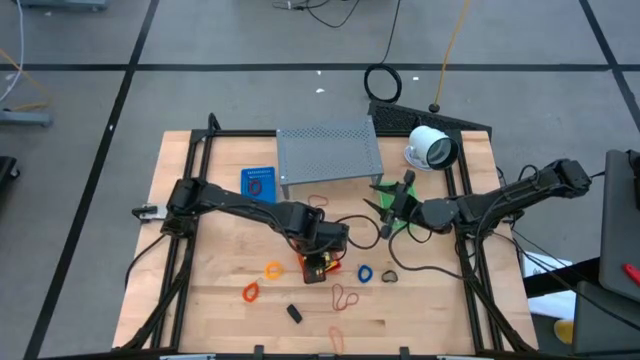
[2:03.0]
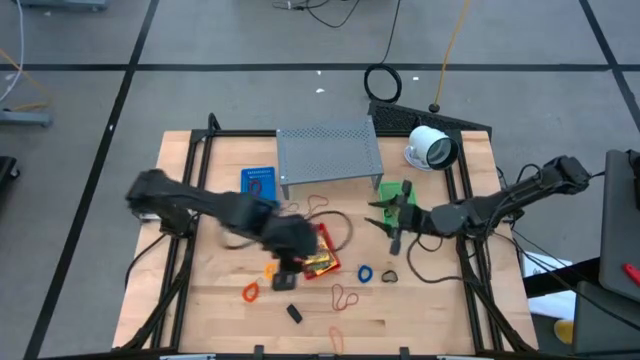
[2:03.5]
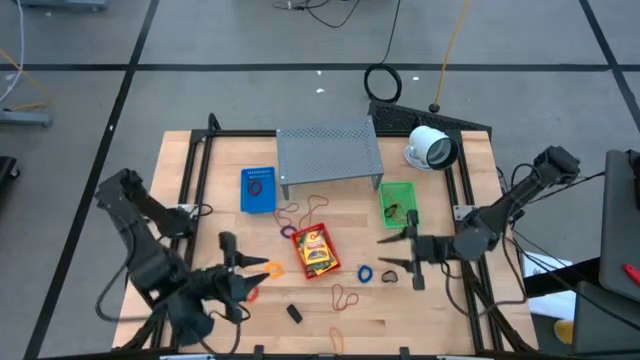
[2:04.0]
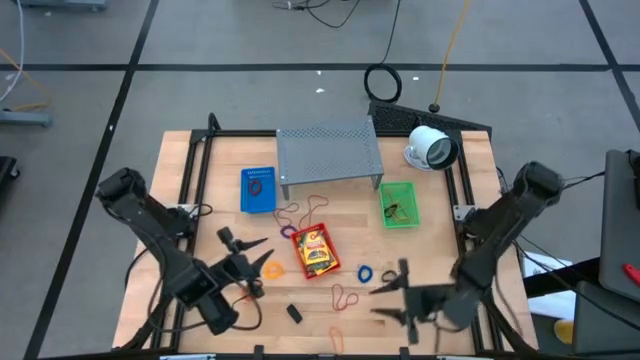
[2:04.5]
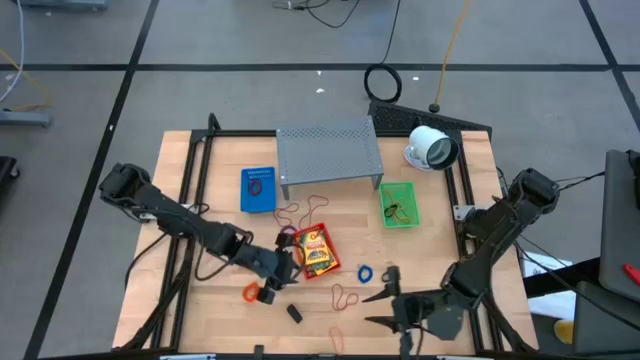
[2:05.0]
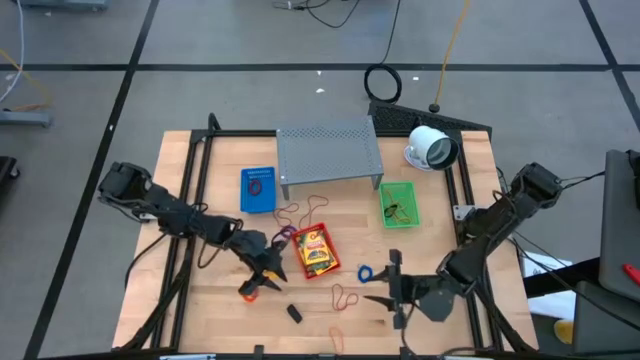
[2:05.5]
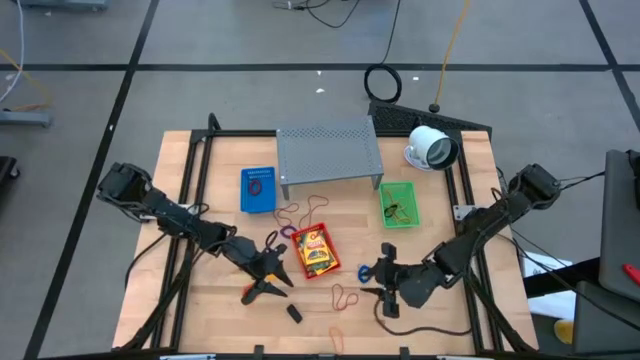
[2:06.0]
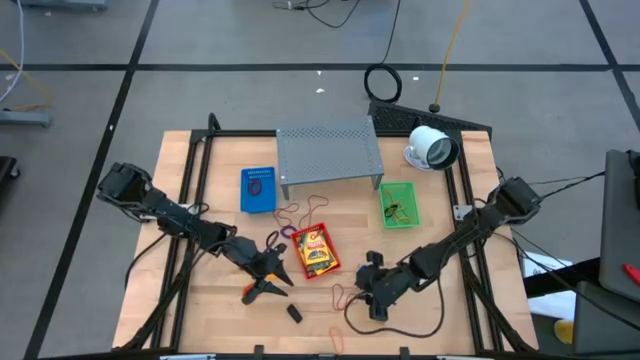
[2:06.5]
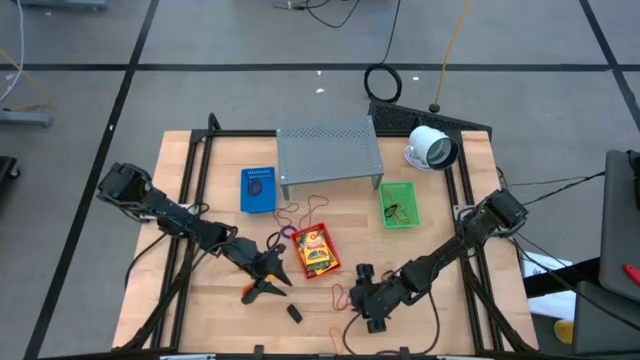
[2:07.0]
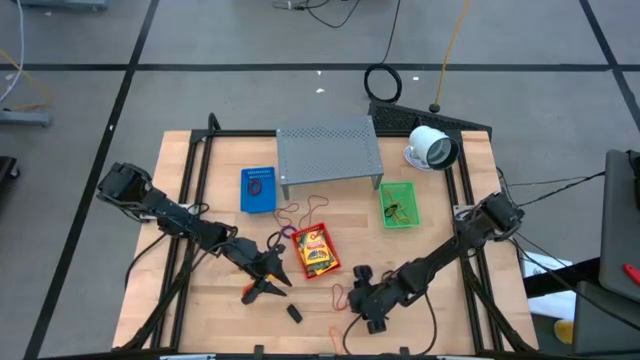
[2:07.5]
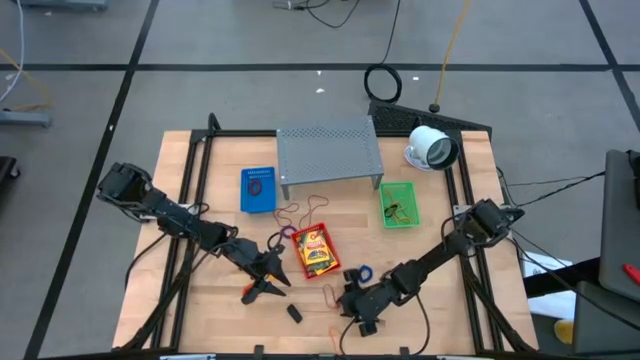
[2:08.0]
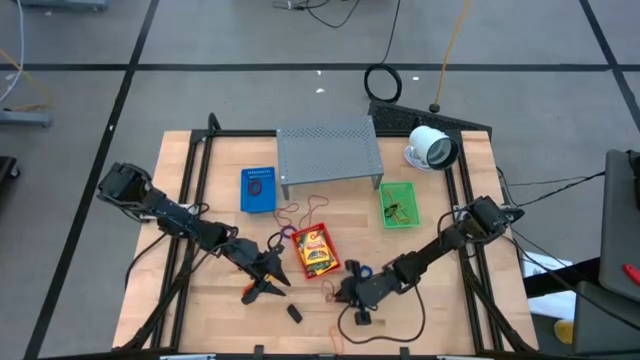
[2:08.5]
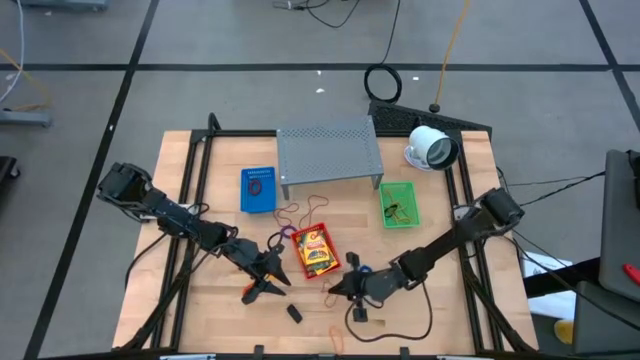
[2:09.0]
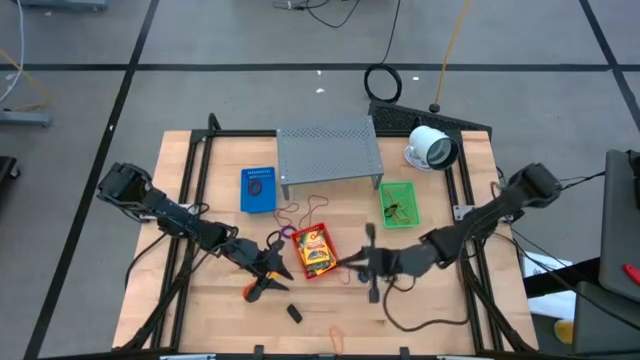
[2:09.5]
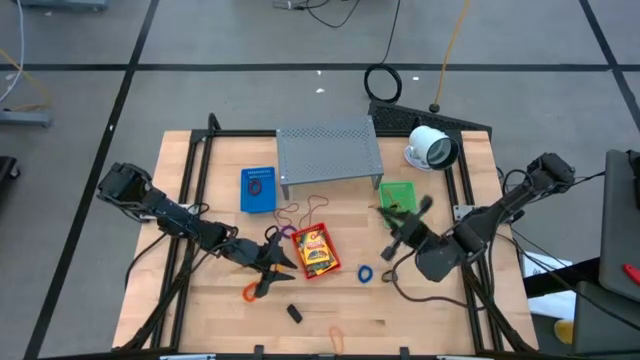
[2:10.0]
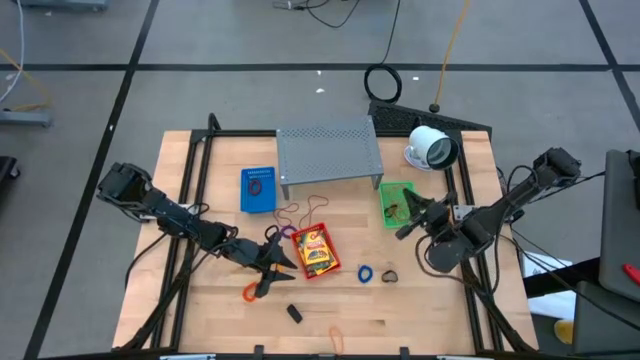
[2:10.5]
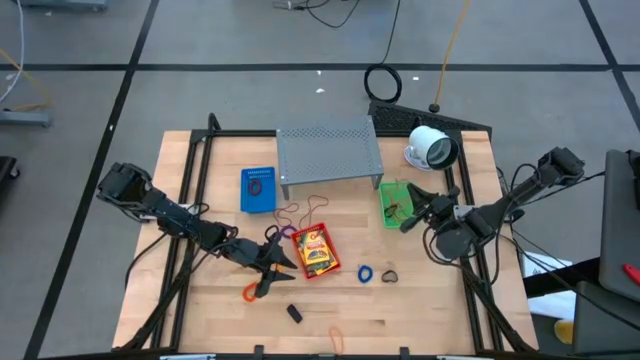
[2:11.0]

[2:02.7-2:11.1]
Task: Pick & Place Office Desk Supplies
Put the bottom red rubber band into the green bin

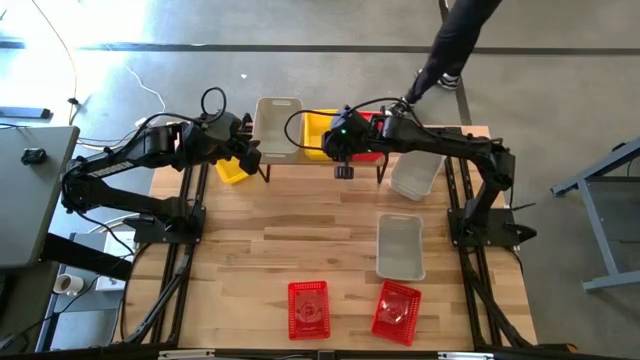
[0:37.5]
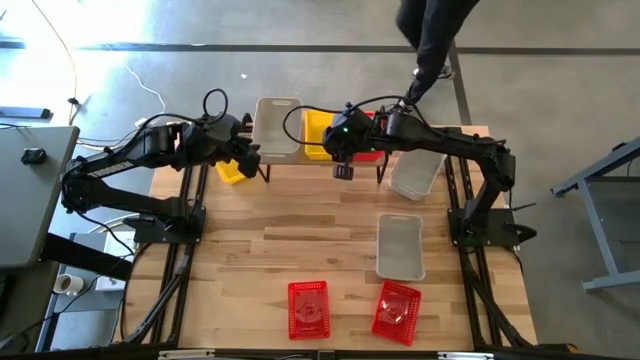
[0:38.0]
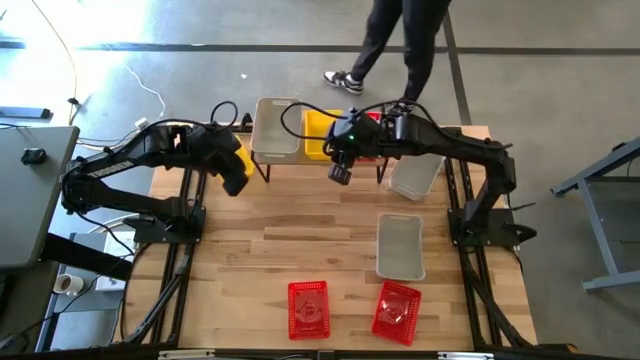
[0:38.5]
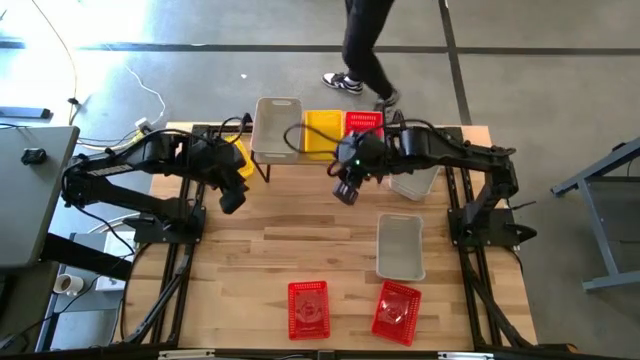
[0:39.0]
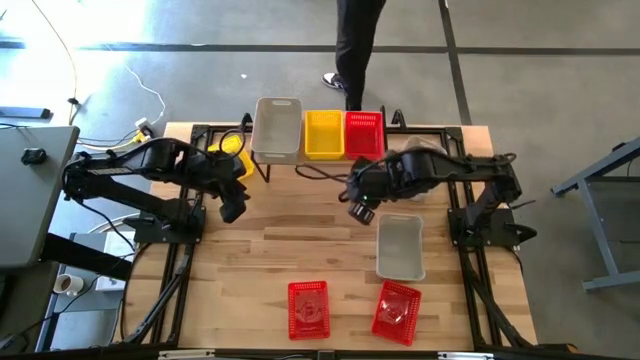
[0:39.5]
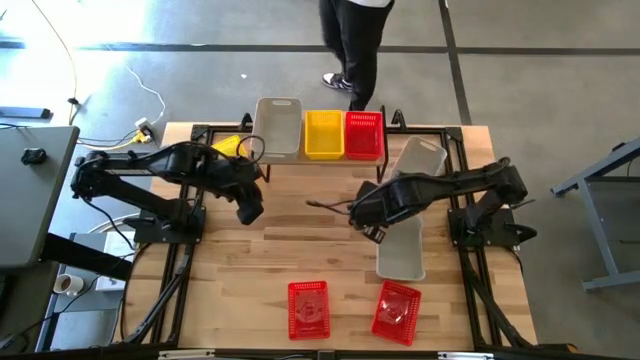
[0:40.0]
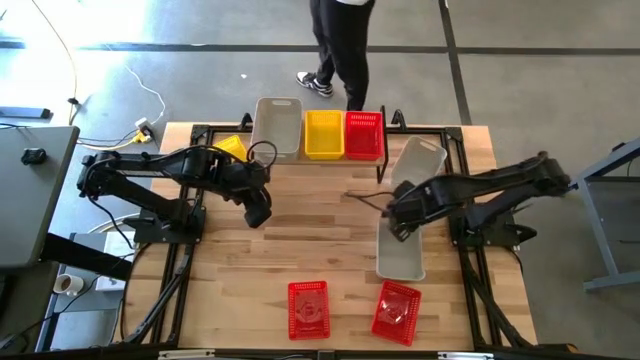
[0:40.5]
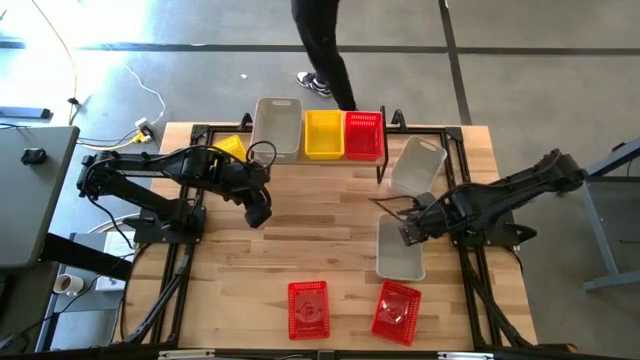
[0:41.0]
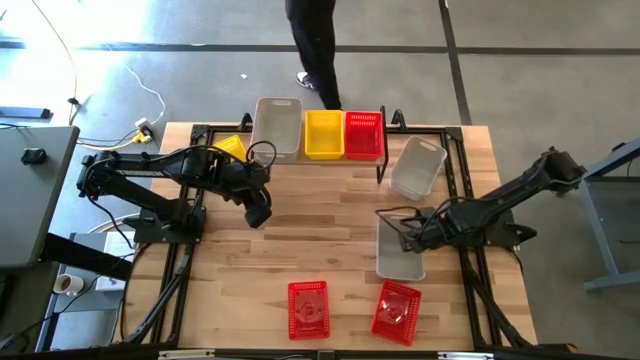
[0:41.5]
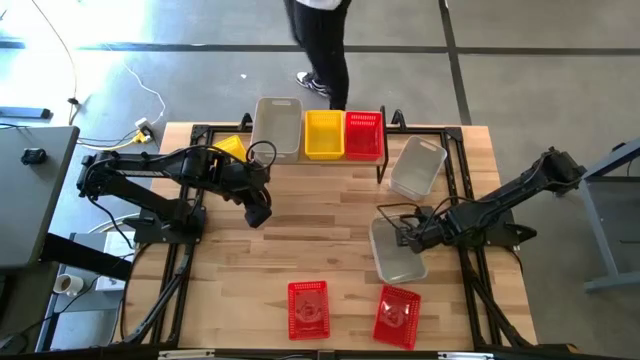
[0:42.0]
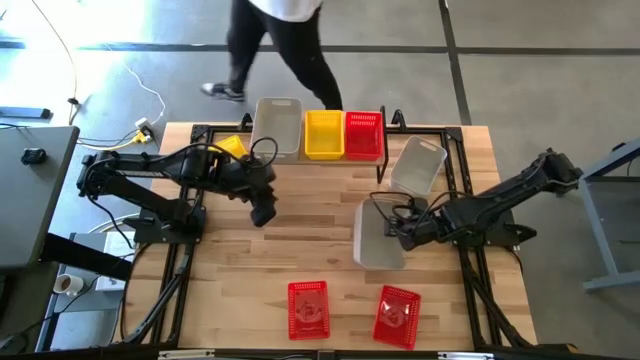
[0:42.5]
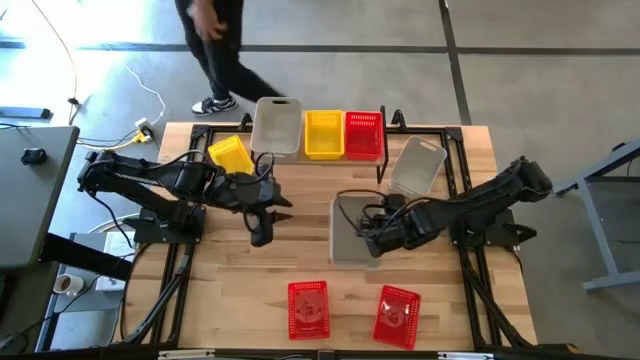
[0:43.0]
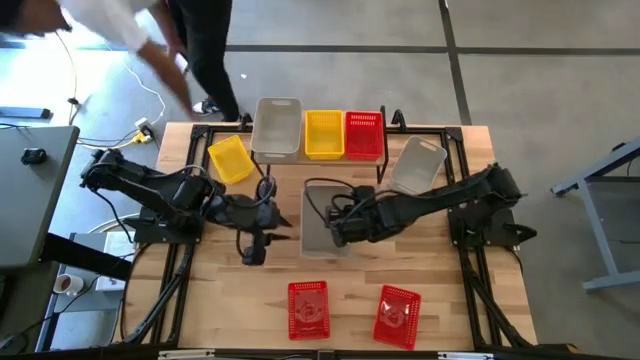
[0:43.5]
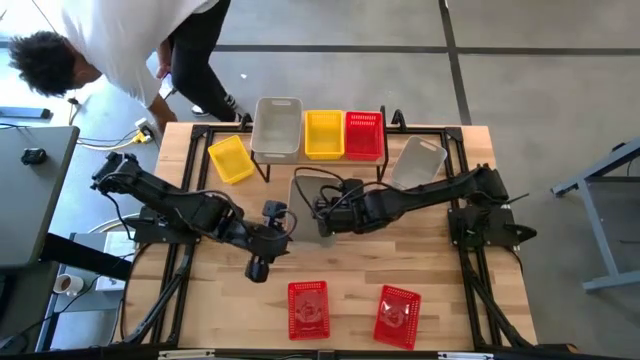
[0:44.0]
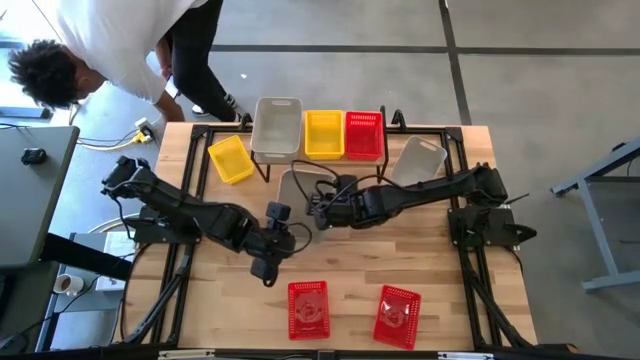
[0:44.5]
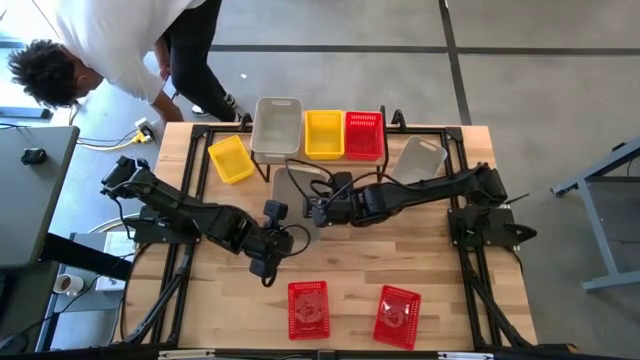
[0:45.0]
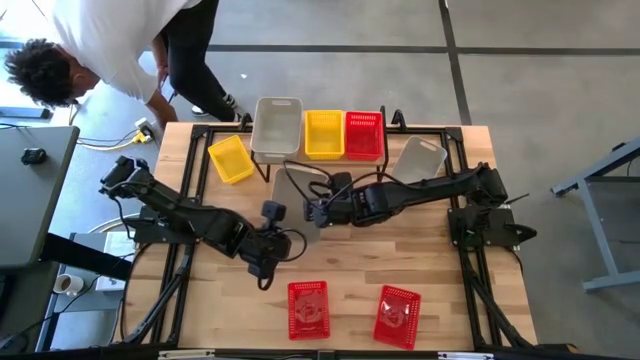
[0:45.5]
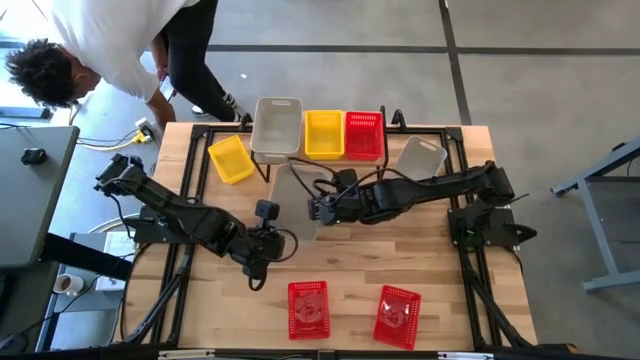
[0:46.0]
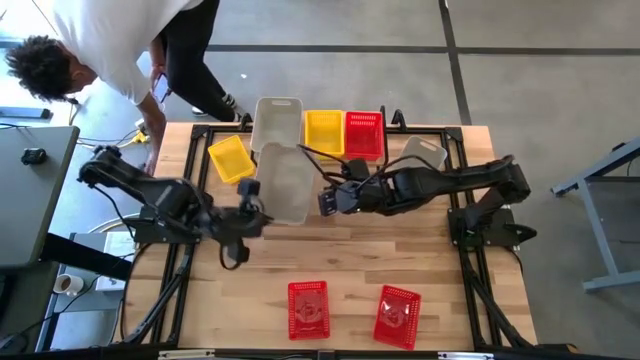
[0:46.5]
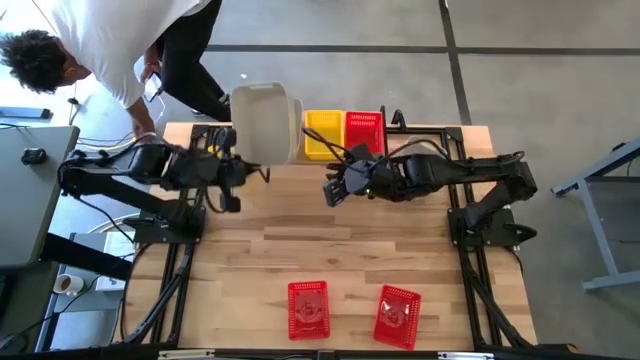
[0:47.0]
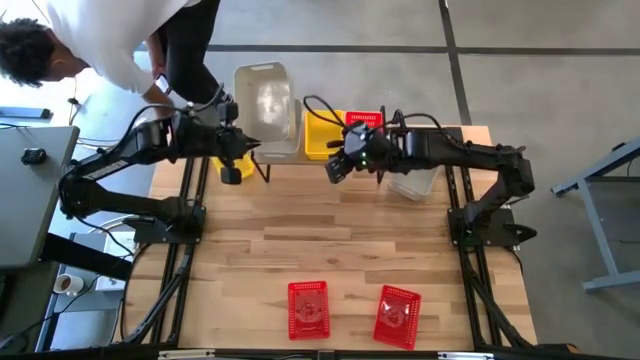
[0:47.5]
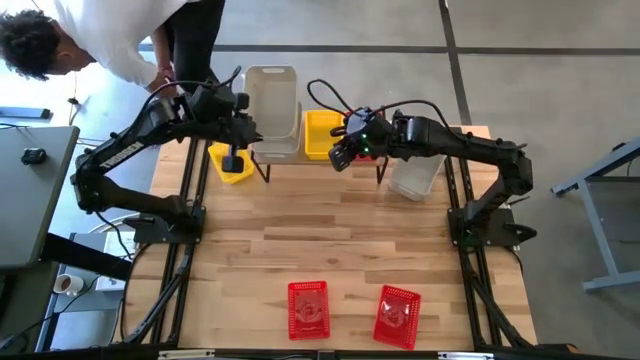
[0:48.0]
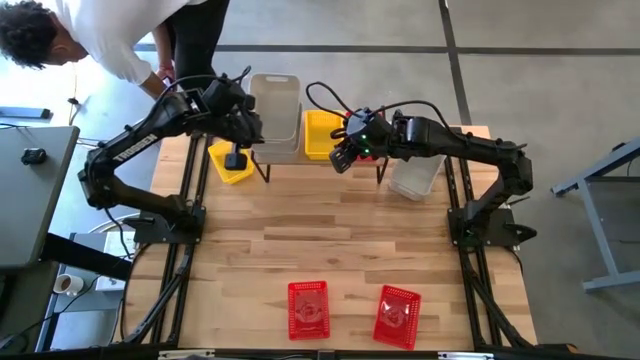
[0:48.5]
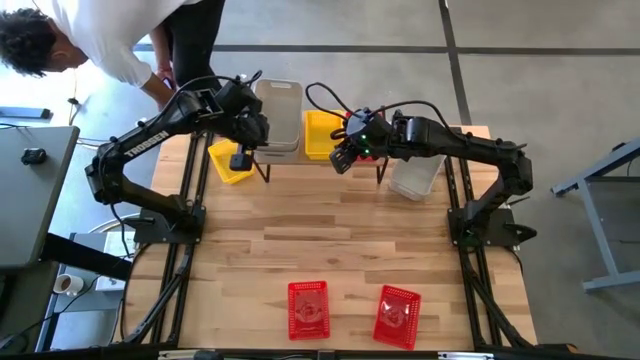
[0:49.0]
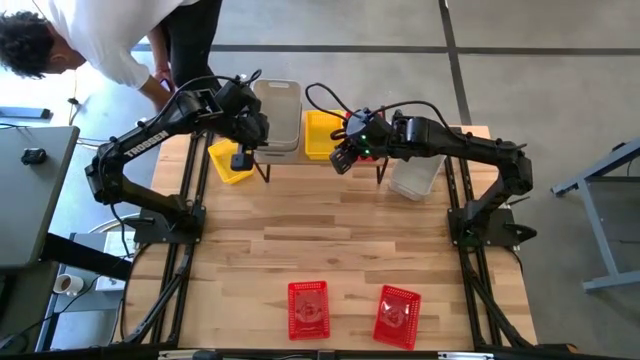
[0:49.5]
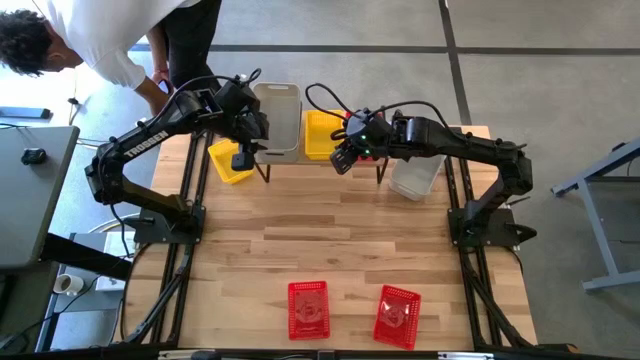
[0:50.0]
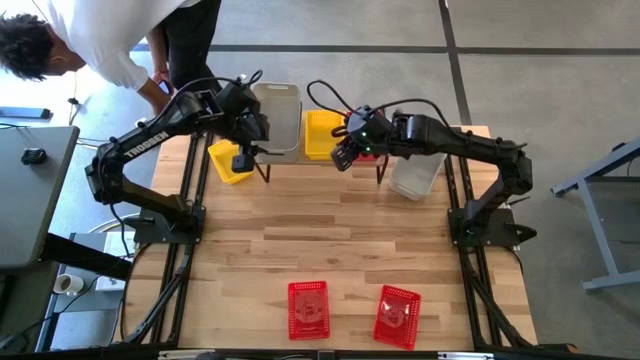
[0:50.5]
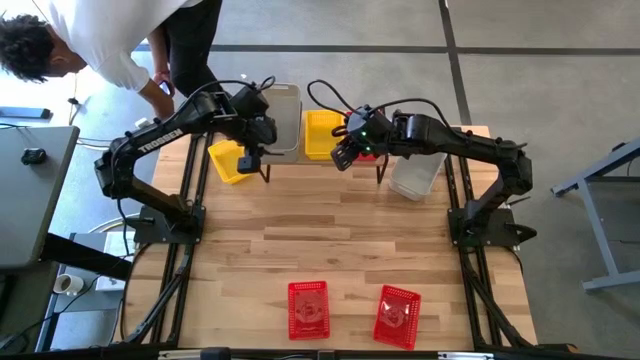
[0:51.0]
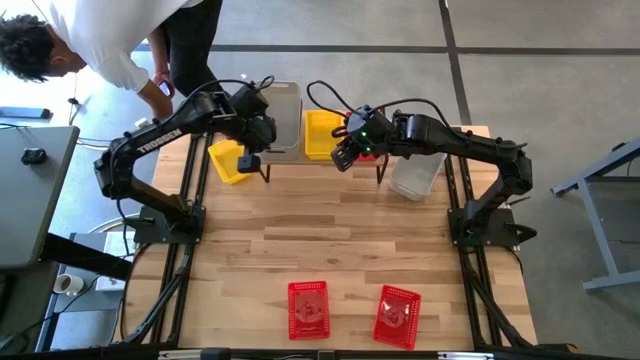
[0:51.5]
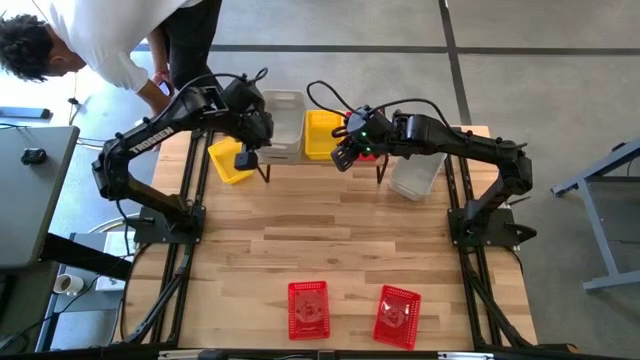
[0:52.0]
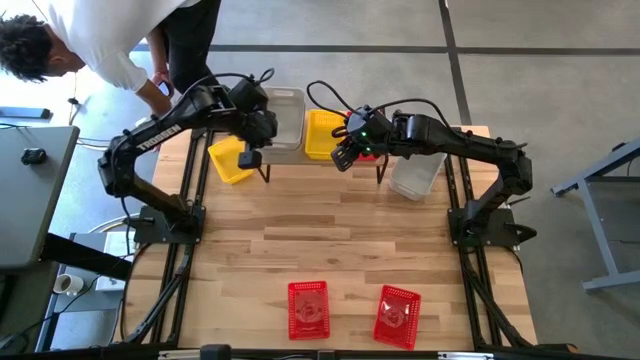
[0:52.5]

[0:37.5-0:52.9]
Task: Stack baskets on shelf by color
Stack the bottom gray bin on top of the other gray bin on the shelf
